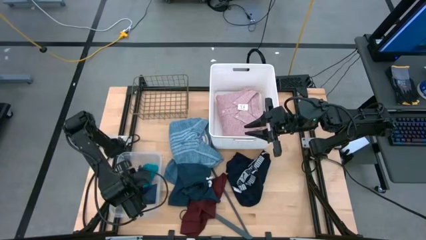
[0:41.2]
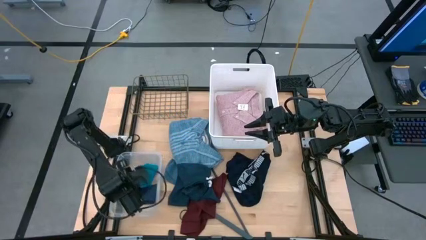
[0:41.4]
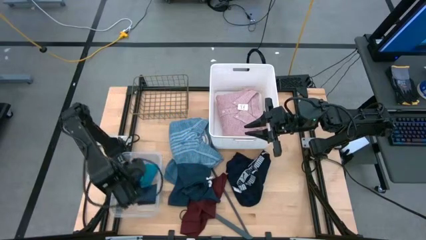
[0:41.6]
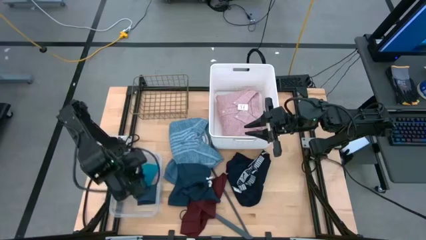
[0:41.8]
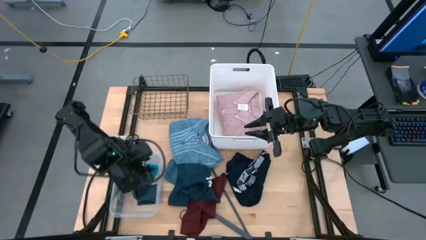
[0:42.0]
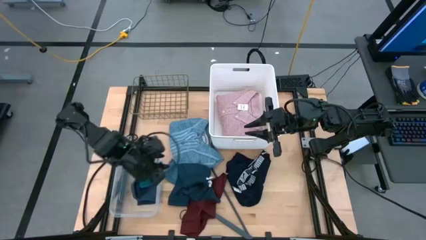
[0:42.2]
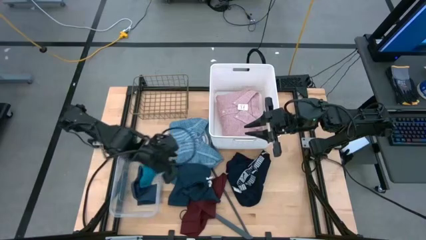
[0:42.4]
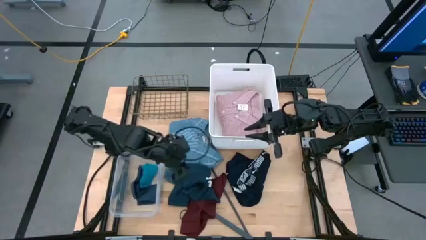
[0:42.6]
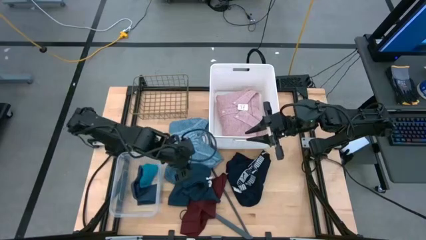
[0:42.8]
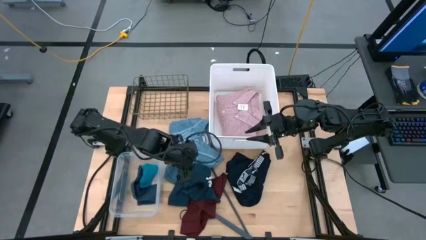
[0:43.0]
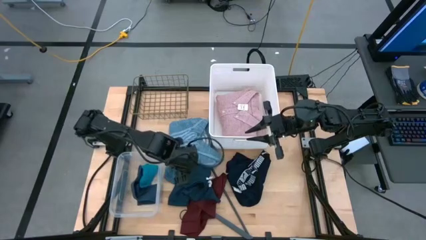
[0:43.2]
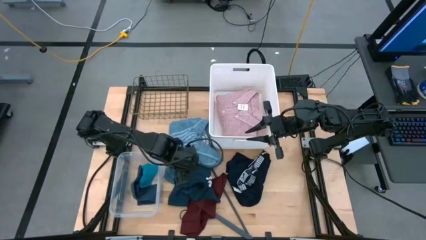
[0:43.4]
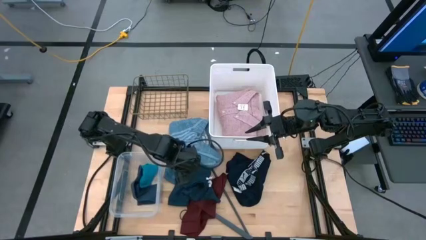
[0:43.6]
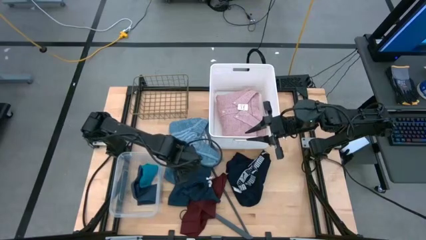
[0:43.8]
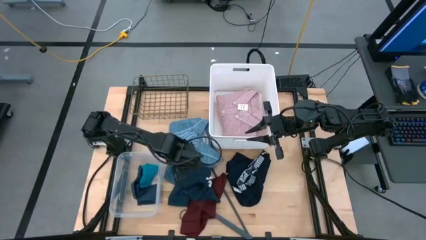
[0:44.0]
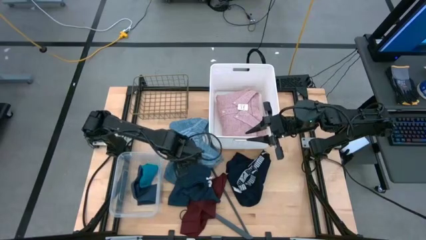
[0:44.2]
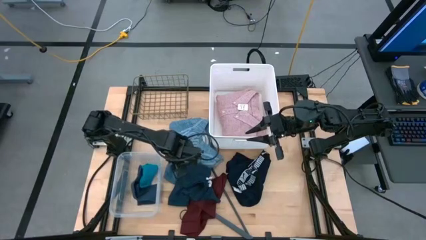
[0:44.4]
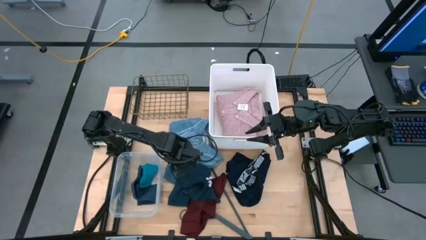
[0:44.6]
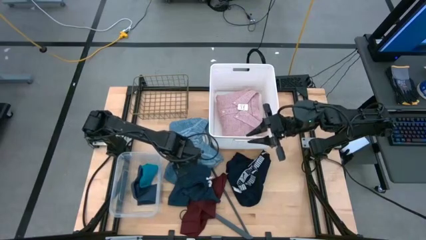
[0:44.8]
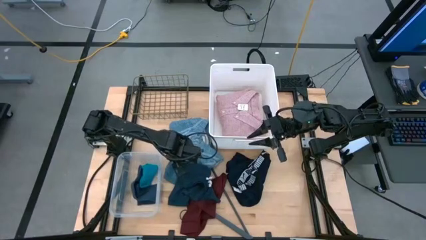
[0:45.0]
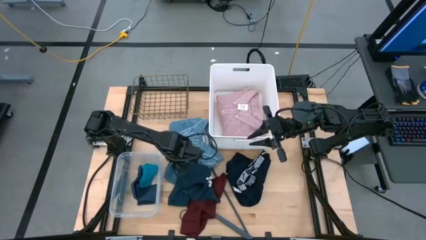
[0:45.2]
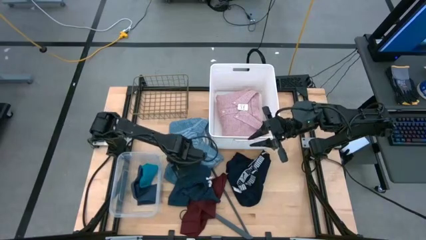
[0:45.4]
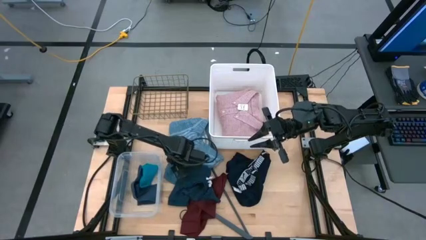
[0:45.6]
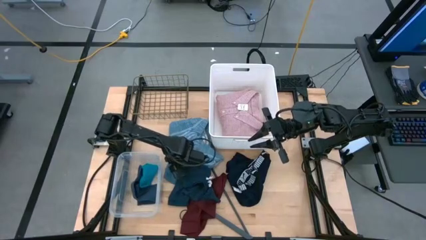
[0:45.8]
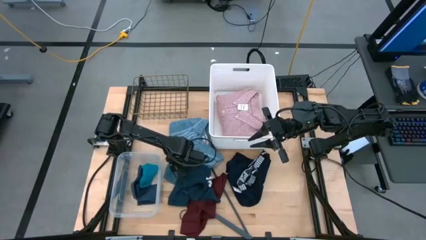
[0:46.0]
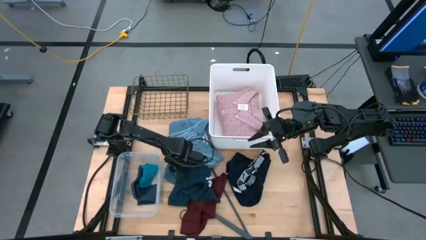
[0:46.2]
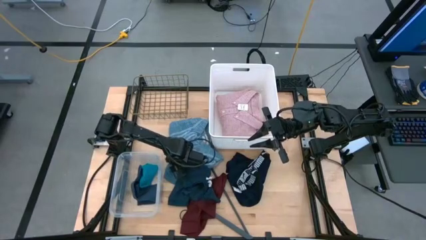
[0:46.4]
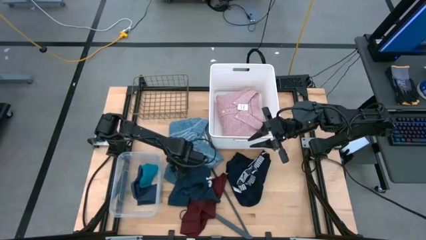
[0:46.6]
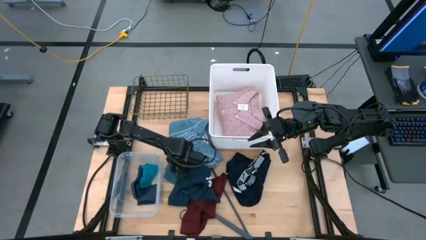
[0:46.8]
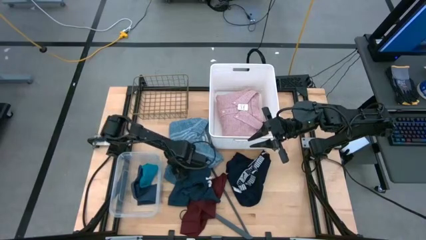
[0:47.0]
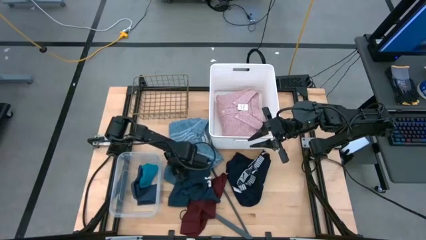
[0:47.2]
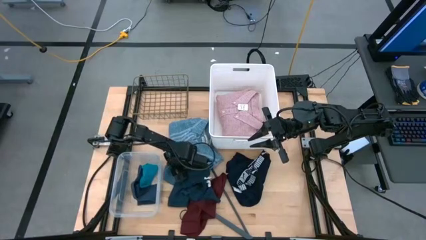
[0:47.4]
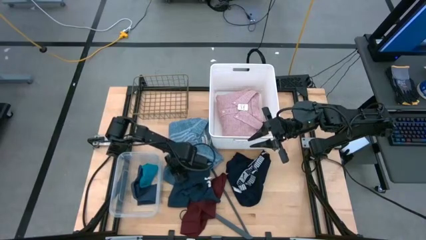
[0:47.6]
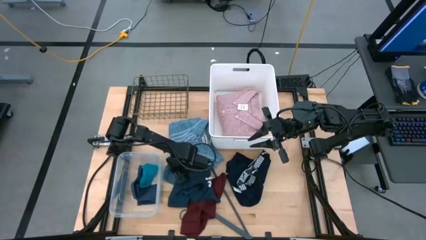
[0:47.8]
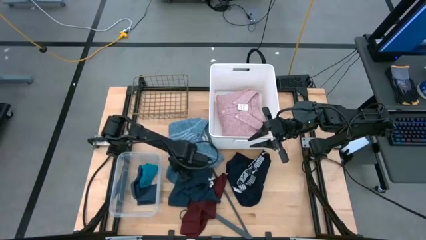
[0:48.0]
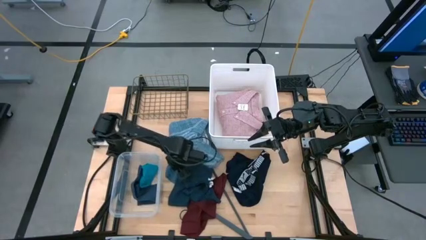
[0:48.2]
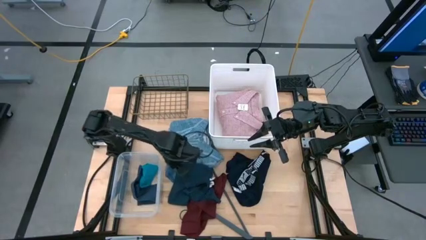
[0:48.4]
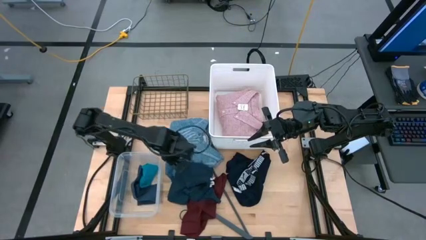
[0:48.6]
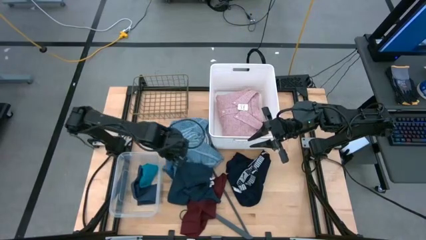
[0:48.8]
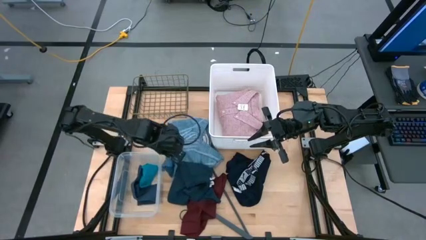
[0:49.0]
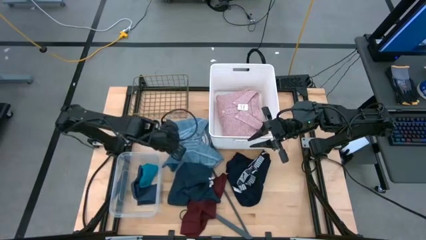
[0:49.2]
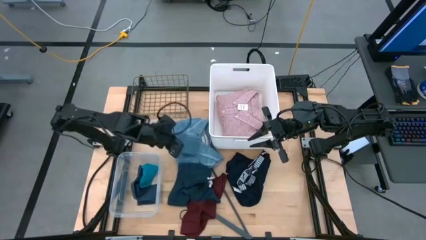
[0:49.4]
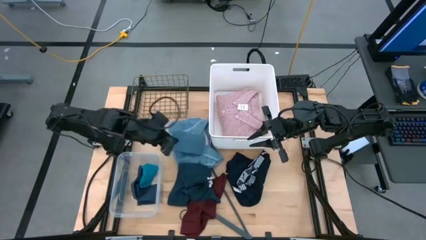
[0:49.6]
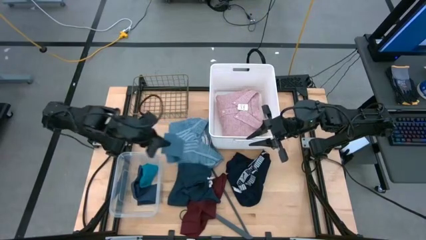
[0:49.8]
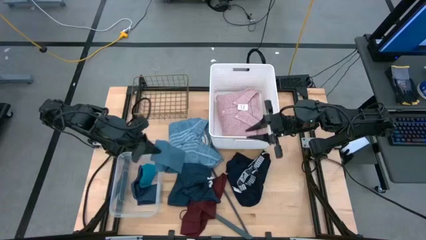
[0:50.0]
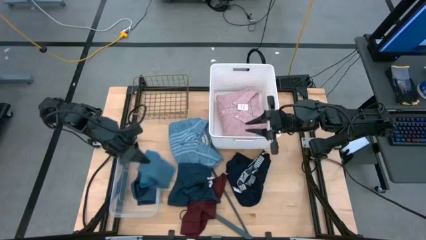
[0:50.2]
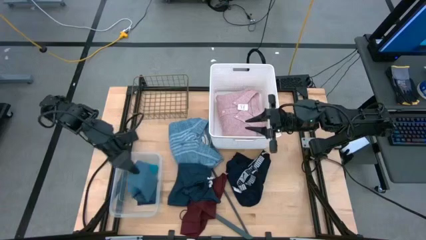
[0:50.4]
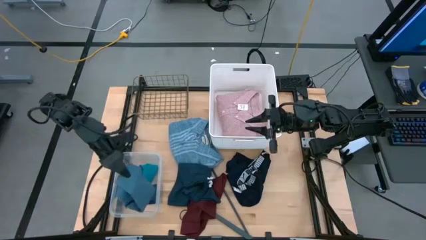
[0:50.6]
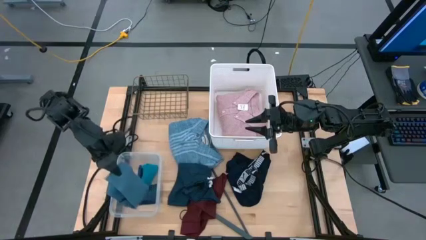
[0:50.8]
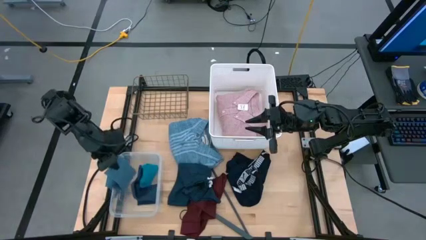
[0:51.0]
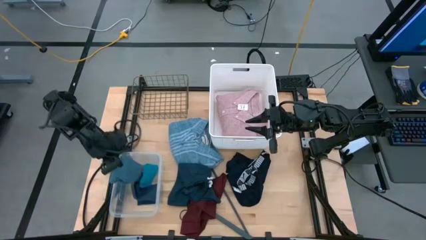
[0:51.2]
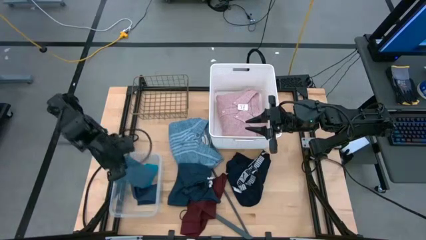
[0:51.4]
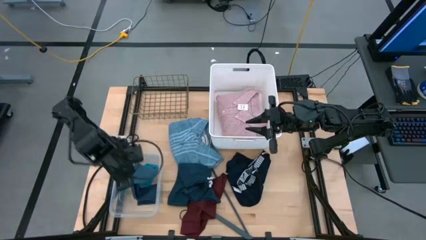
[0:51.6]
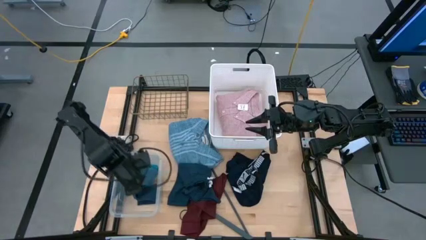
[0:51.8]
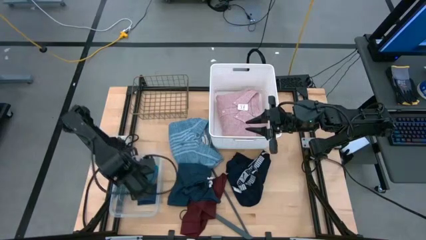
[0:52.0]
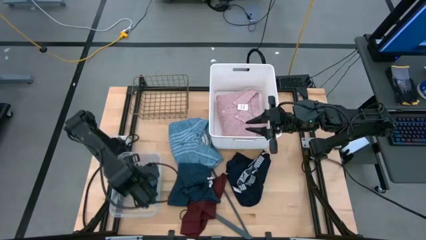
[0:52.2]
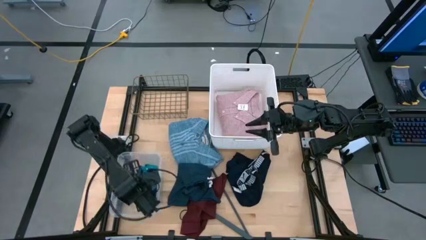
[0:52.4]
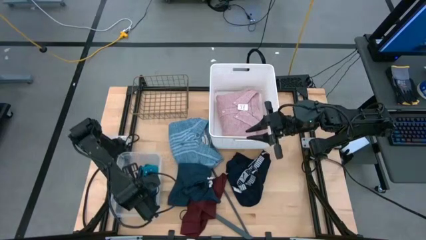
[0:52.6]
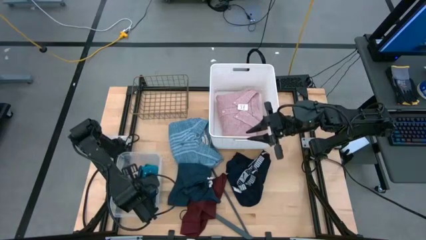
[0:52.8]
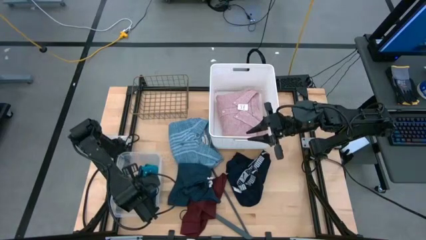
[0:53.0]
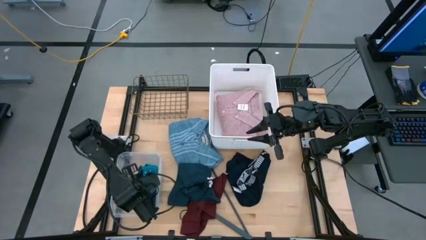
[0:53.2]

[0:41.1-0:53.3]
Task: Pick & Place Cloths
Put the gray sock into the transparent bin

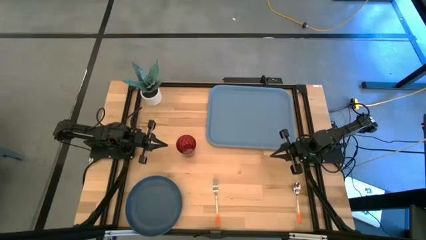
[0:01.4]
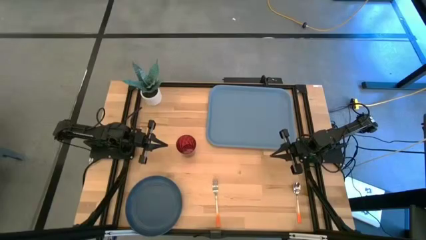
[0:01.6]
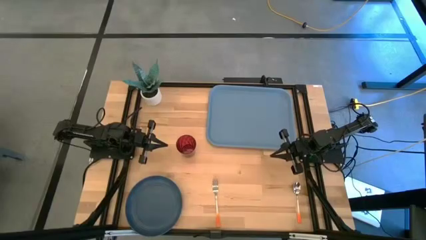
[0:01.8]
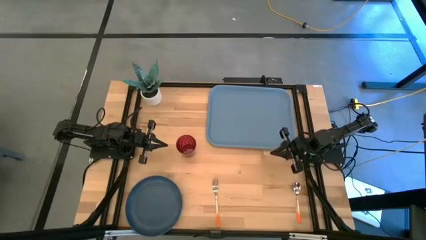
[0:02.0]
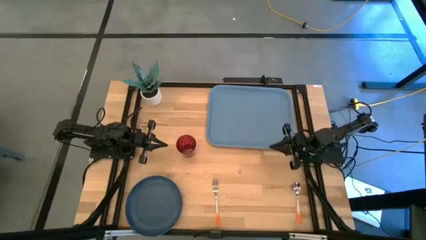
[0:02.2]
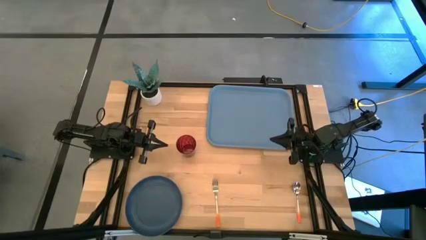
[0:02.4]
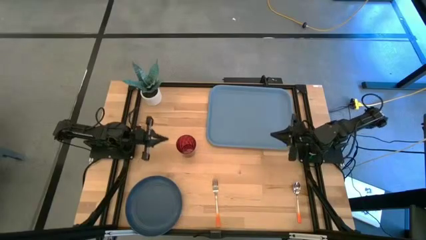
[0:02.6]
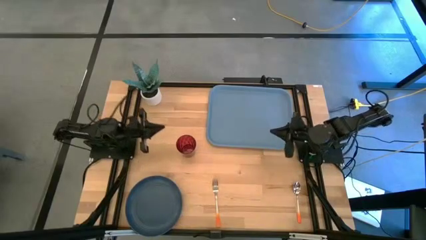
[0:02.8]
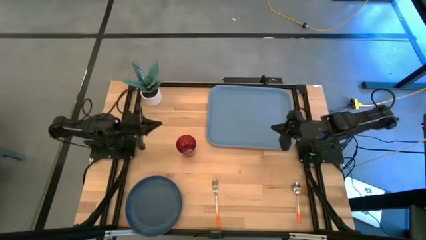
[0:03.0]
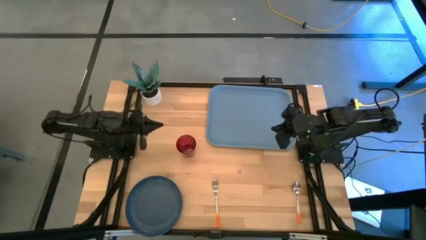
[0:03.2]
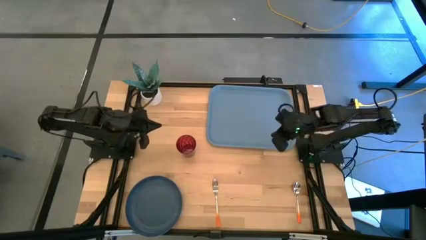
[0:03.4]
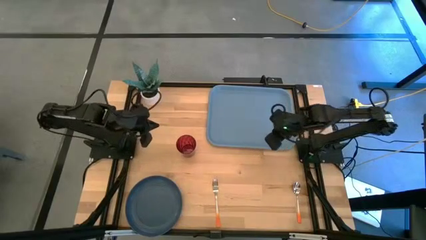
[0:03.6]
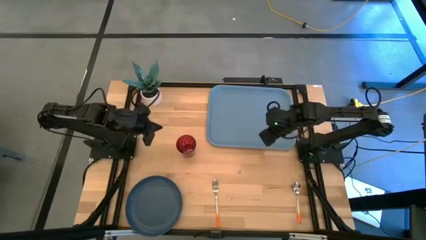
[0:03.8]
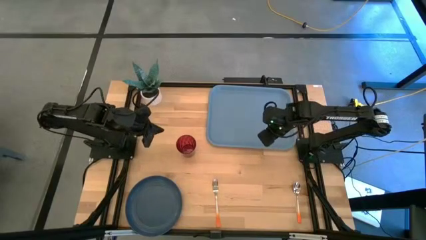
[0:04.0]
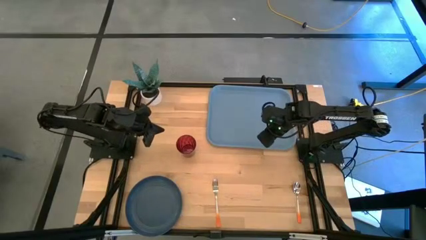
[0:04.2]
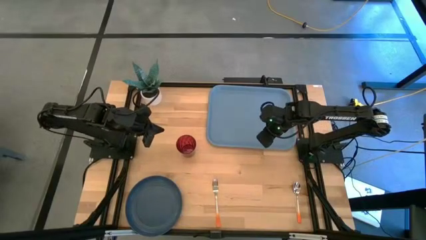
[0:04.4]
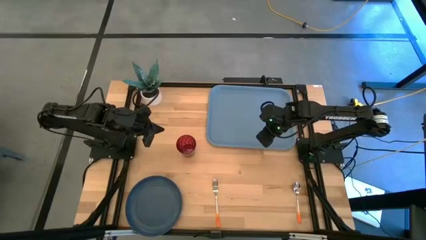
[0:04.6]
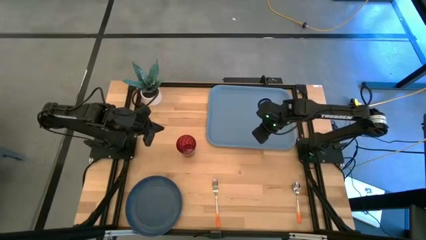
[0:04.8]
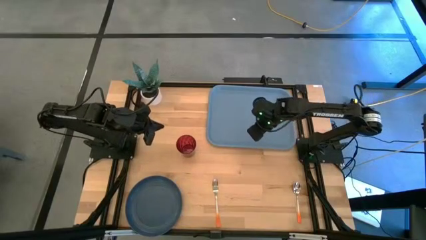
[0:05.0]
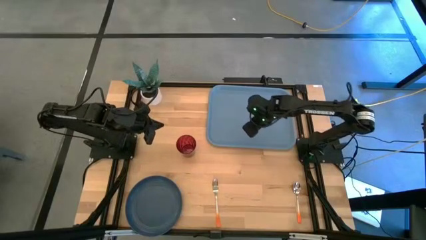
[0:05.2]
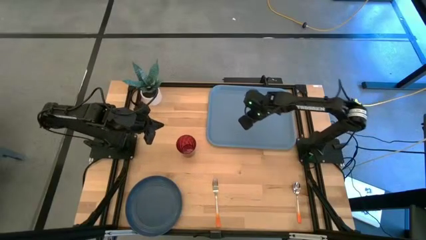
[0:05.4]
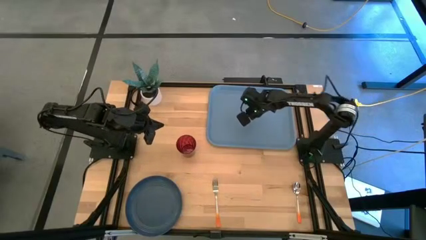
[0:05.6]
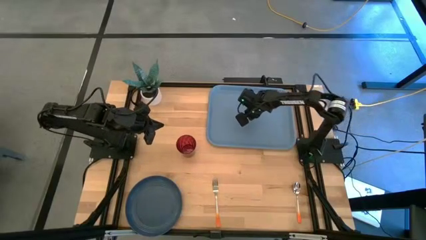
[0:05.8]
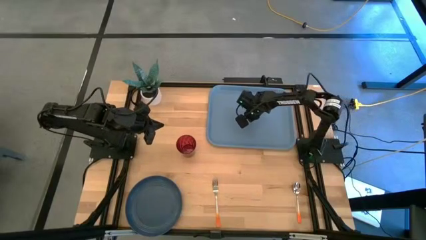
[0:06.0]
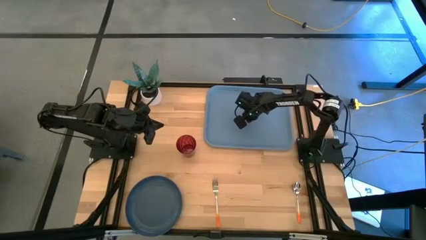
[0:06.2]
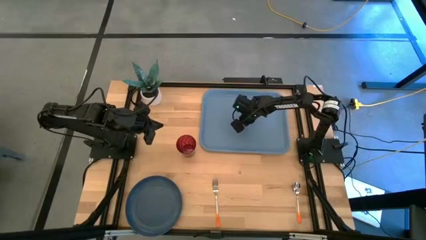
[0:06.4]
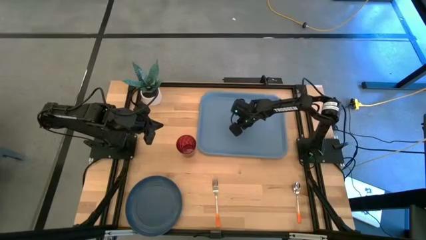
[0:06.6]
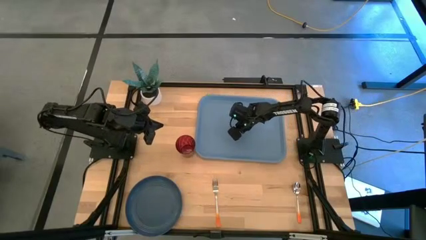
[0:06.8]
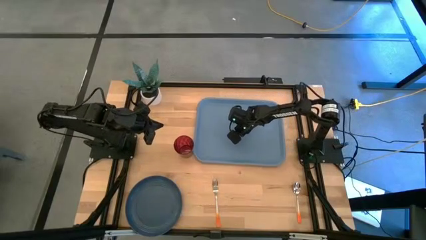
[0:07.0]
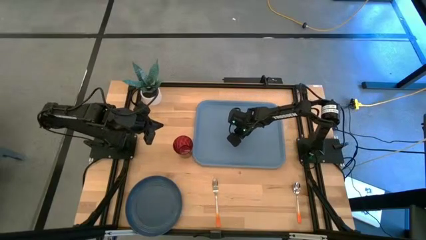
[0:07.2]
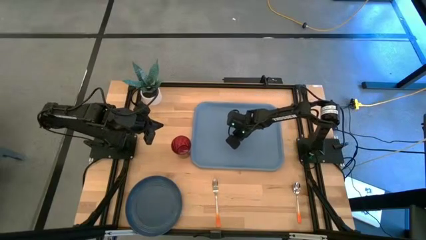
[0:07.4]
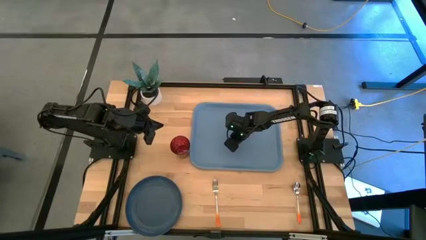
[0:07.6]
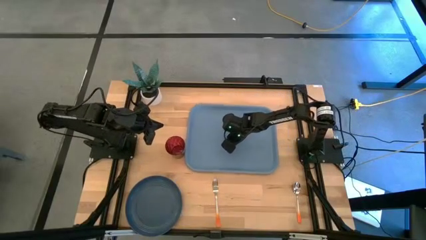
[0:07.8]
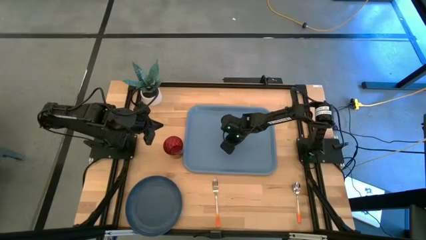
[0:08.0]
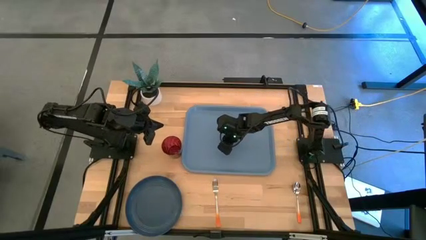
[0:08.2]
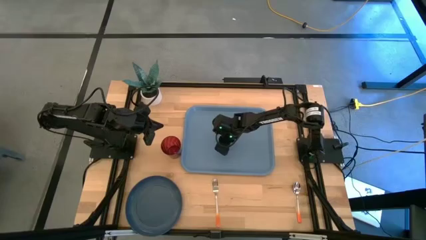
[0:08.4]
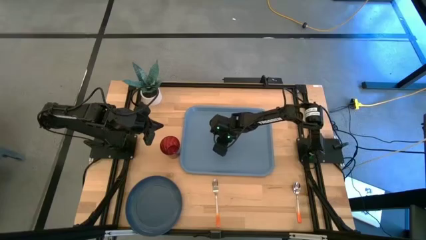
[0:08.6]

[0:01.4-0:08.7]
Task: Pick and place plate/cup/fork/spoon on tray
Move the light blue tray to the left on the table
